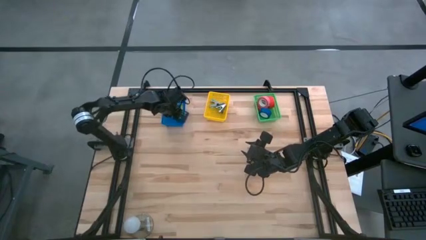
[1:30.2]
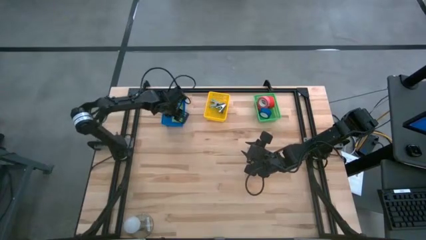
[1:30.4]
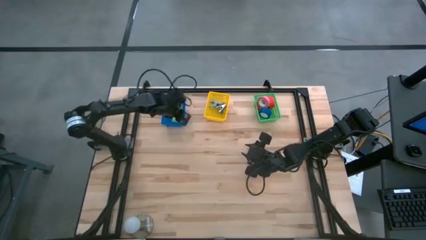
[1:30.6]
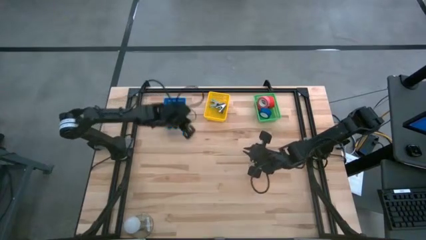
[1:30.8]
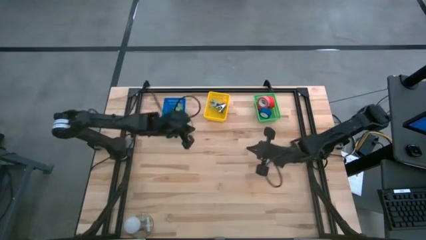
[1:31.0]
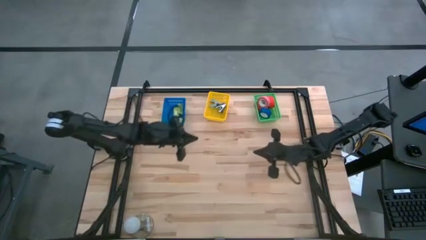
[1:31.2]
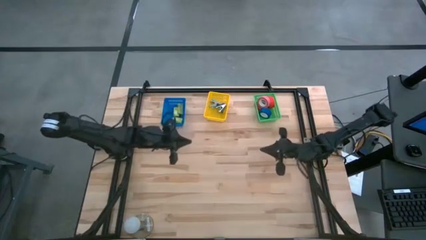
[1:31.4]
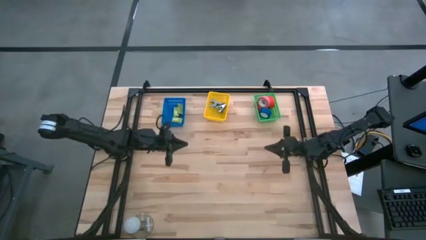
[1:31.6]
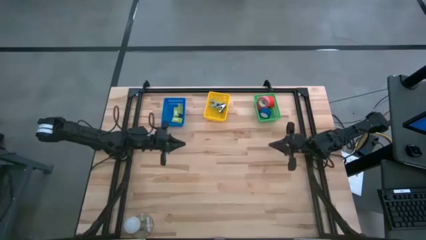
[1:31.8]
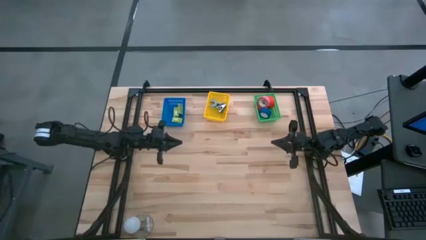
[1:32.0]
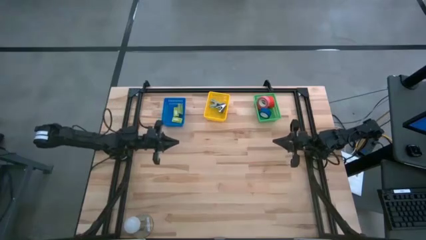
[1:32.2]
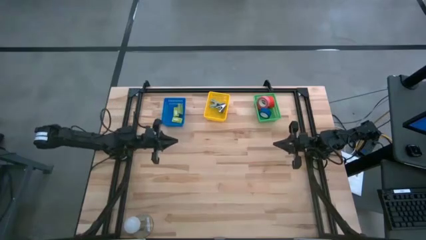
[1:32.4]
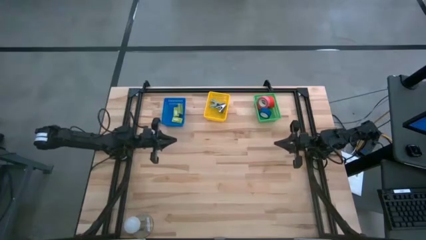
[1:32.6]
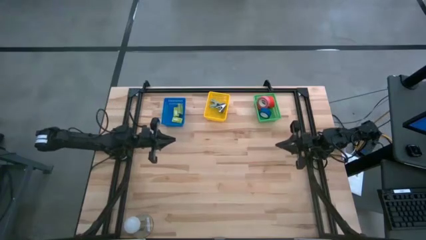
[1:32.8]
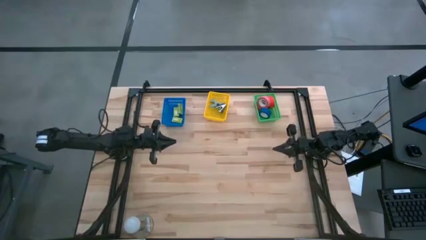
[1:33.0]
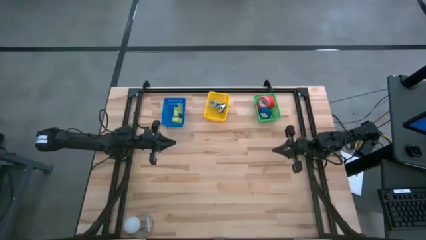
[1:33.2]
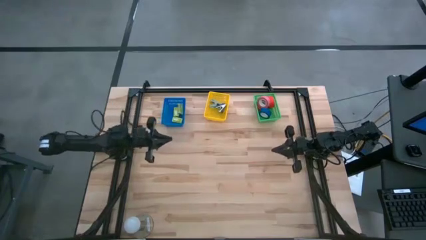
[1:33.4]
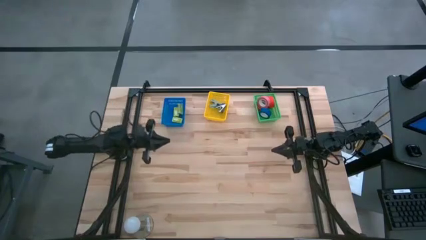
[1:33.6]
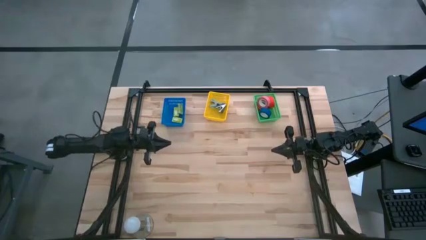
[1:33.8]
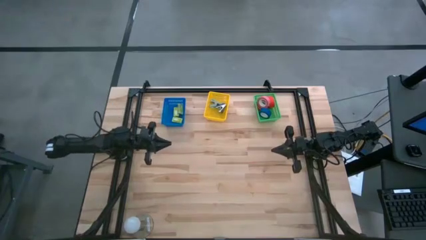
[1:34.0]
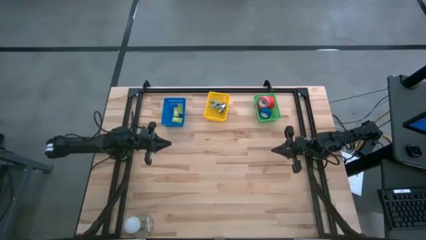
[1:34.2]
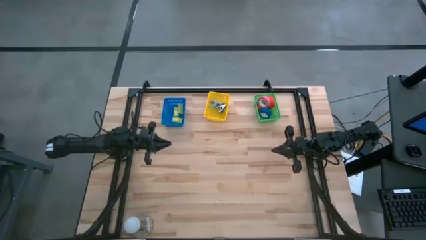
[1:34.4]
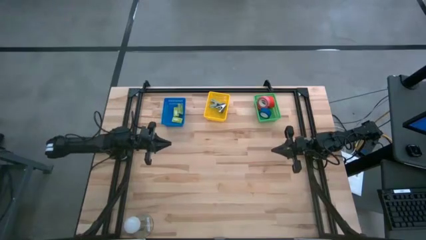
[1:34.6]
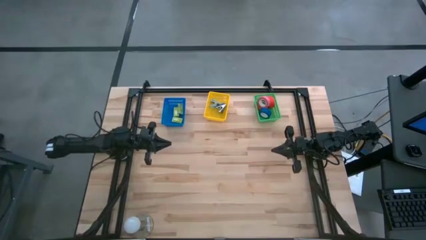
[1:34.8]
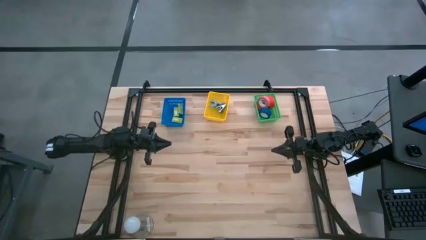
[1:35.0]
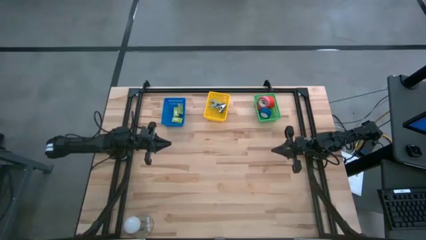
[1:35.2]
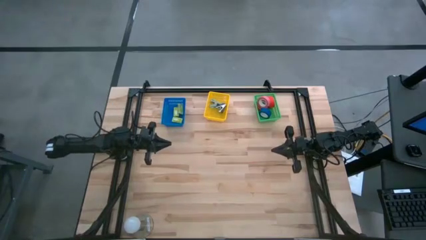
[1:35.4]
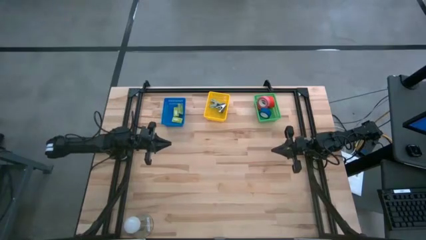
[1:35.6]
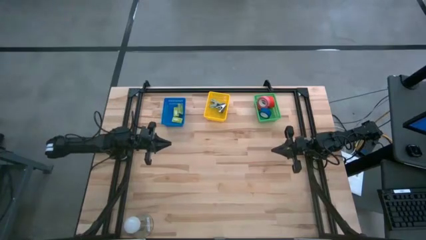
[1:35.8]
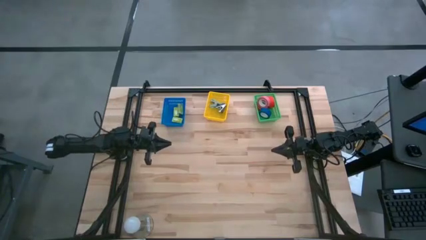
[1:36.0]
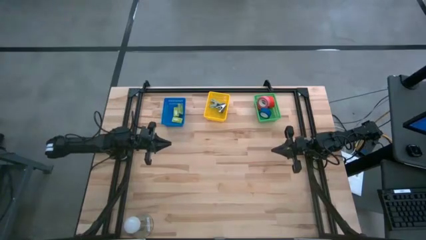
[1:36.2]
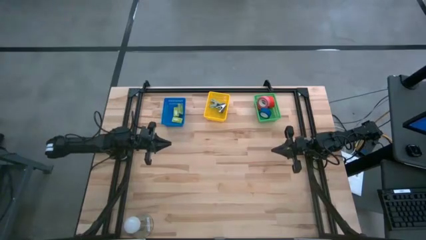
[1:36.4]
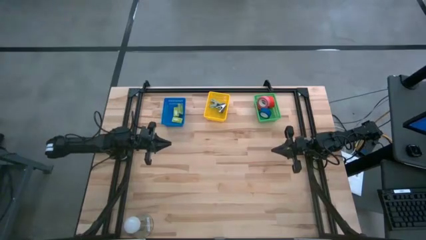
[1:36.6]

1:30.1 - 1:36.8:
Task: Pick and place Stapler, Stapler remover, tape
Return to Home Position

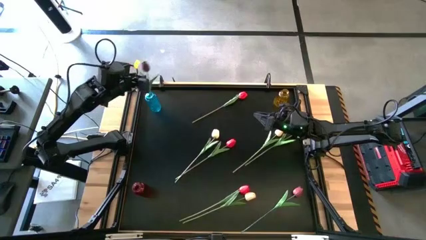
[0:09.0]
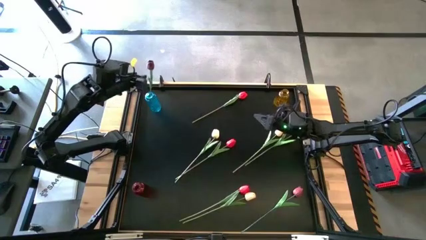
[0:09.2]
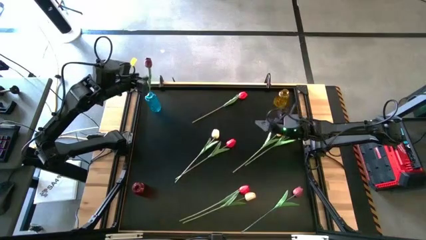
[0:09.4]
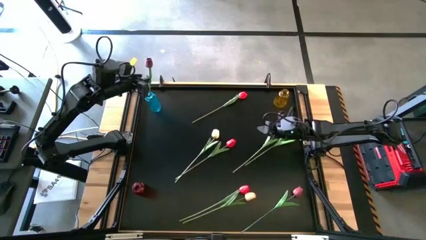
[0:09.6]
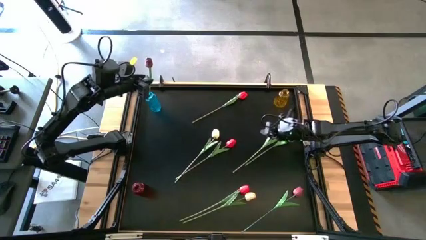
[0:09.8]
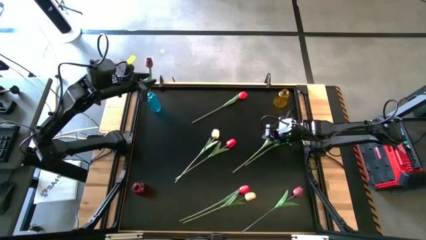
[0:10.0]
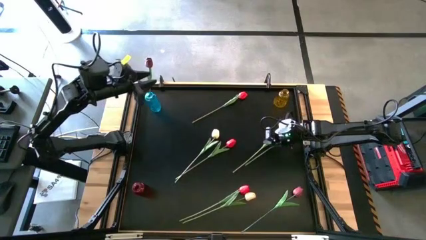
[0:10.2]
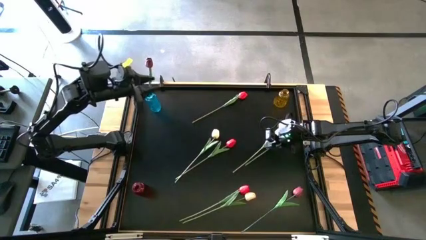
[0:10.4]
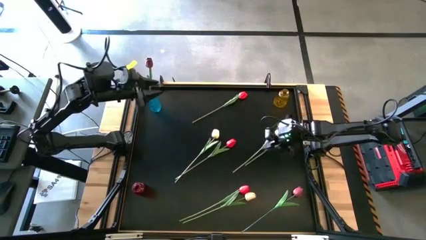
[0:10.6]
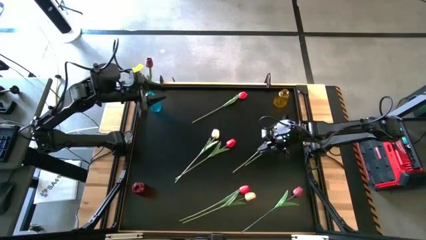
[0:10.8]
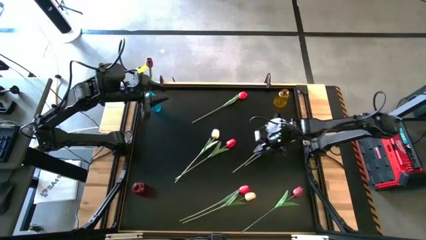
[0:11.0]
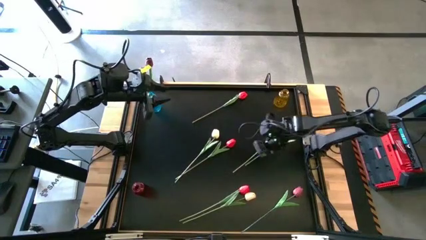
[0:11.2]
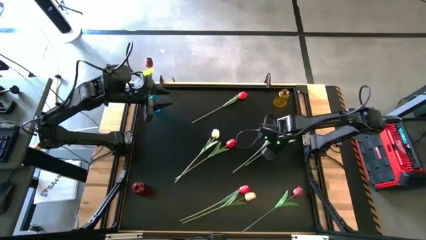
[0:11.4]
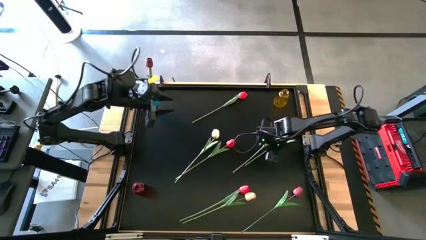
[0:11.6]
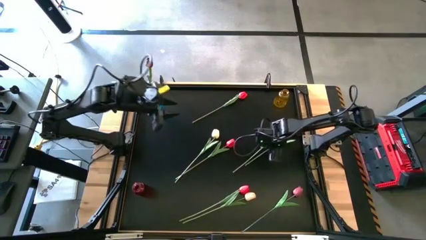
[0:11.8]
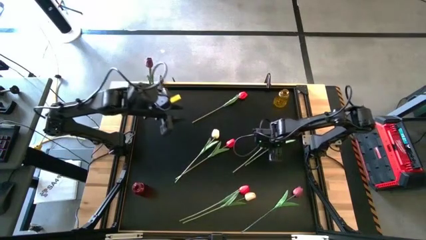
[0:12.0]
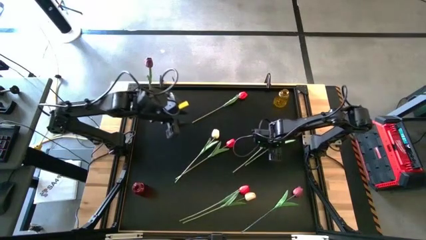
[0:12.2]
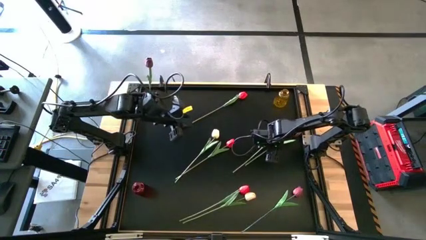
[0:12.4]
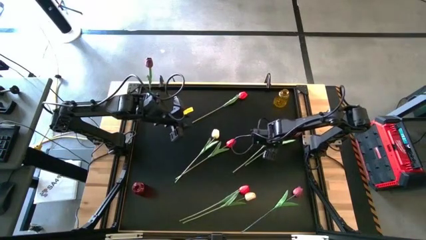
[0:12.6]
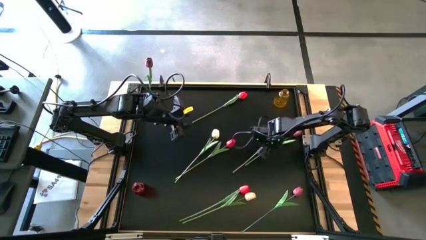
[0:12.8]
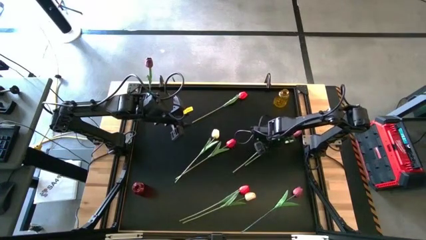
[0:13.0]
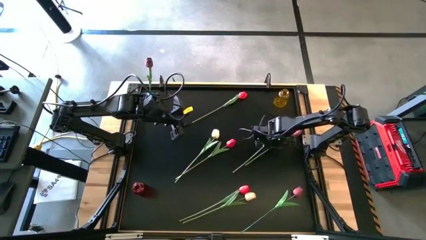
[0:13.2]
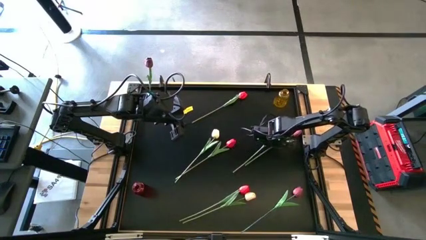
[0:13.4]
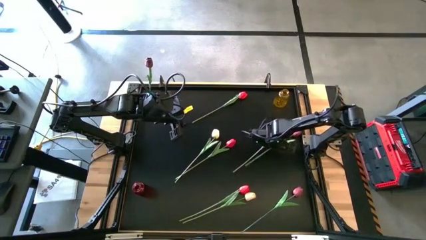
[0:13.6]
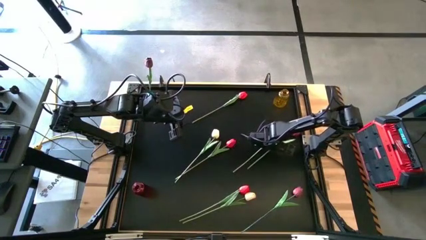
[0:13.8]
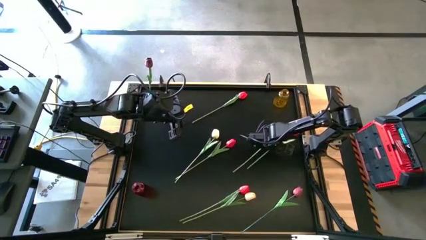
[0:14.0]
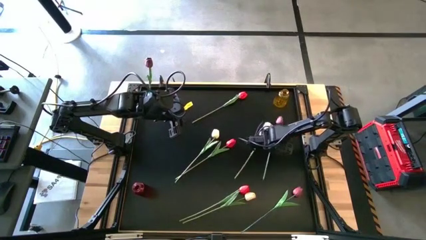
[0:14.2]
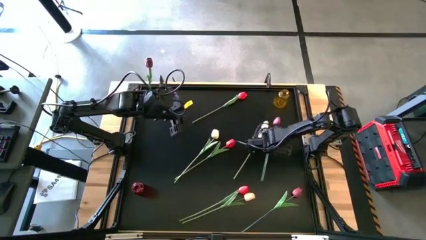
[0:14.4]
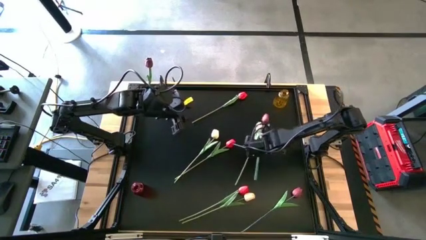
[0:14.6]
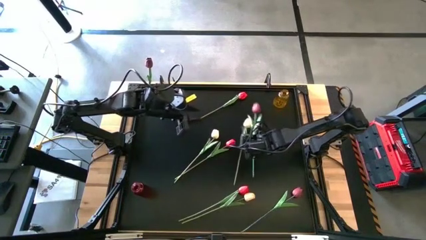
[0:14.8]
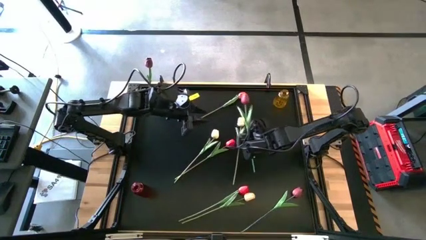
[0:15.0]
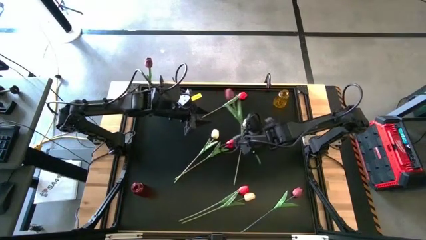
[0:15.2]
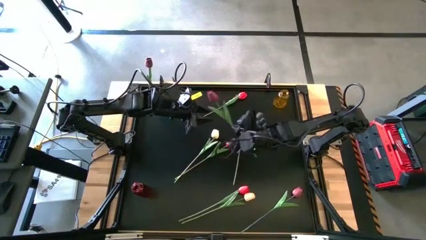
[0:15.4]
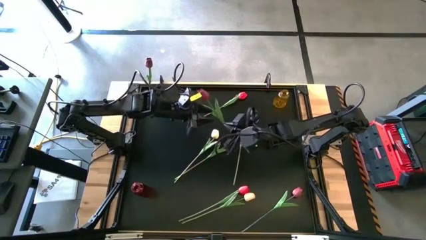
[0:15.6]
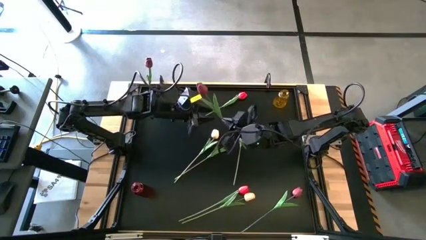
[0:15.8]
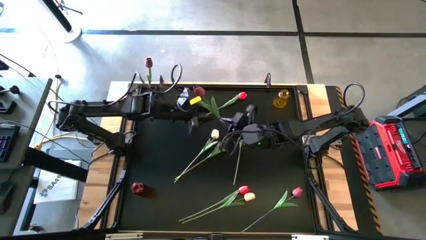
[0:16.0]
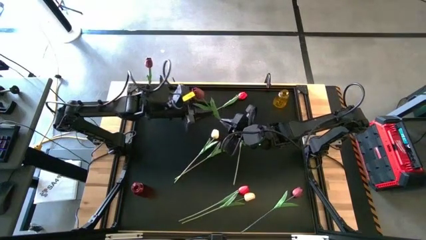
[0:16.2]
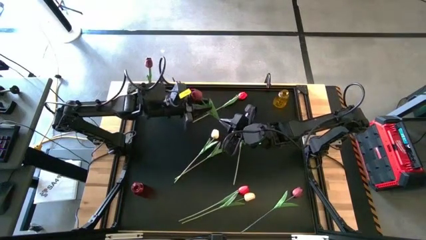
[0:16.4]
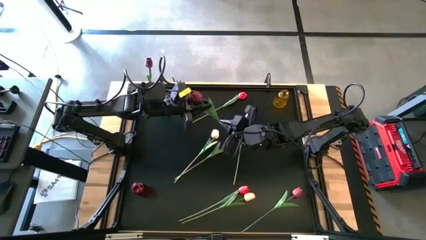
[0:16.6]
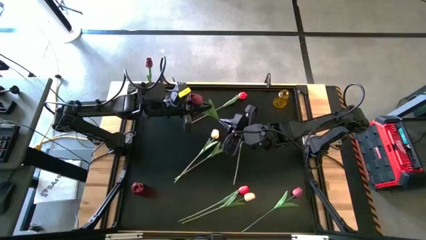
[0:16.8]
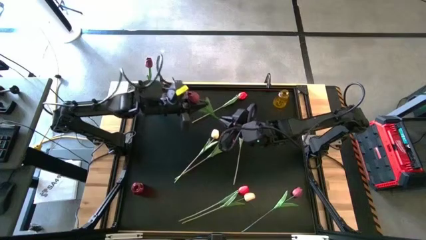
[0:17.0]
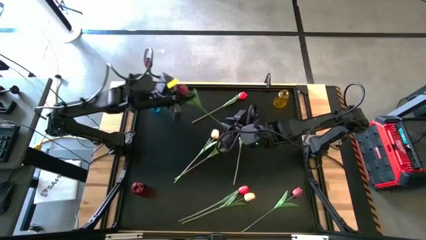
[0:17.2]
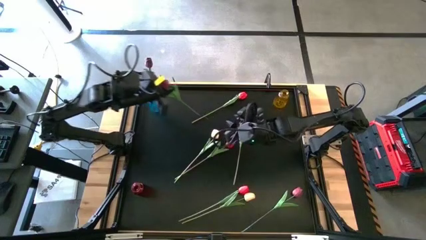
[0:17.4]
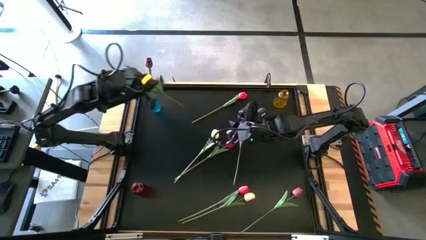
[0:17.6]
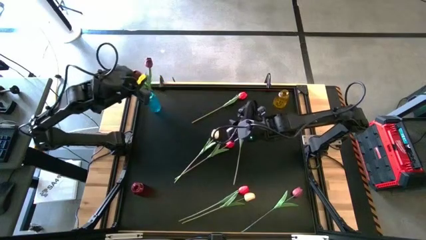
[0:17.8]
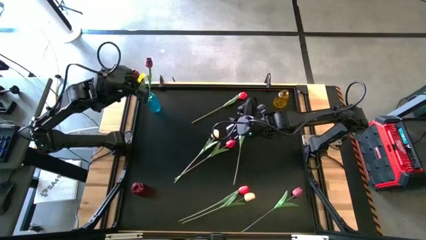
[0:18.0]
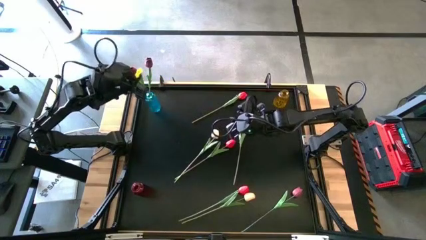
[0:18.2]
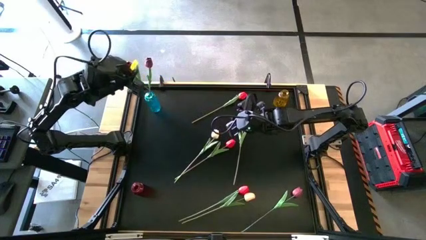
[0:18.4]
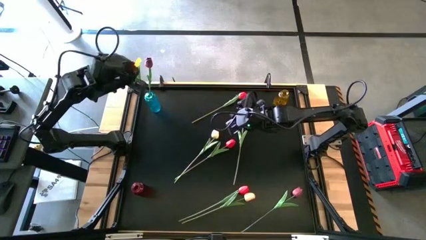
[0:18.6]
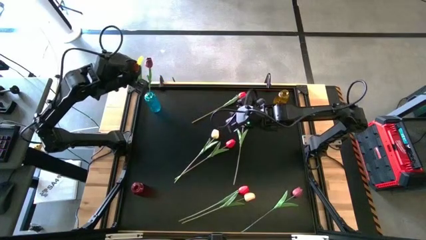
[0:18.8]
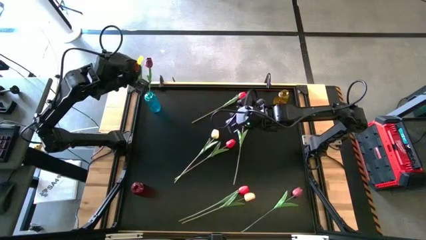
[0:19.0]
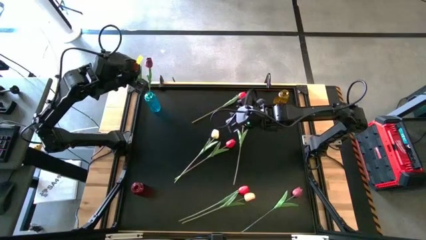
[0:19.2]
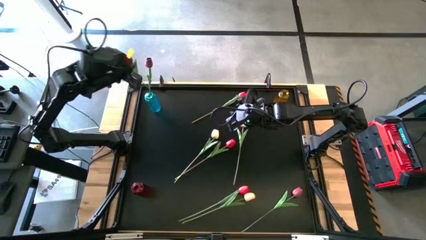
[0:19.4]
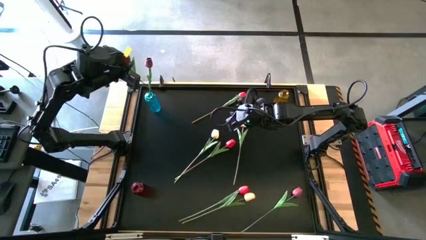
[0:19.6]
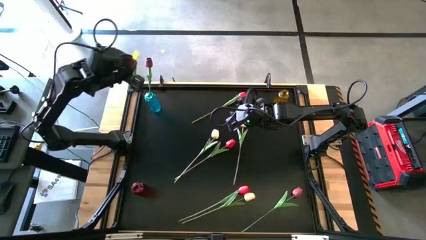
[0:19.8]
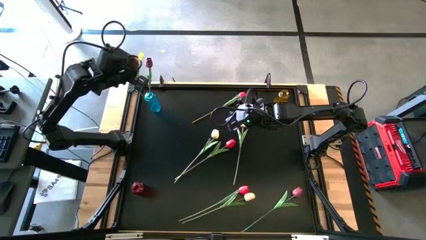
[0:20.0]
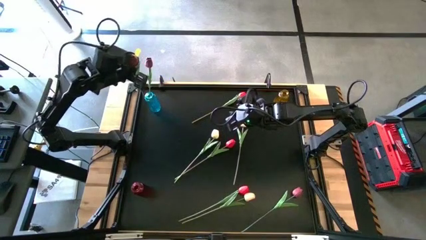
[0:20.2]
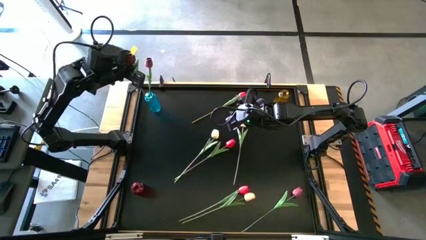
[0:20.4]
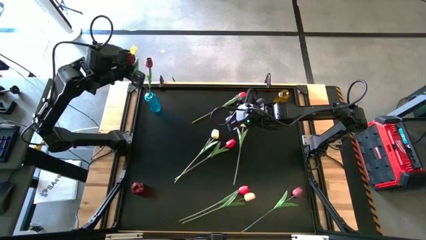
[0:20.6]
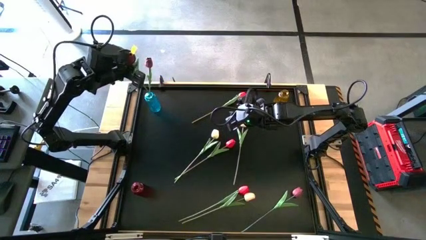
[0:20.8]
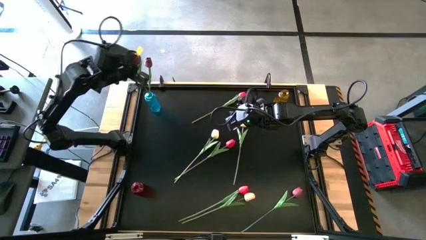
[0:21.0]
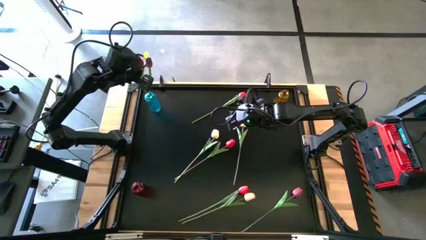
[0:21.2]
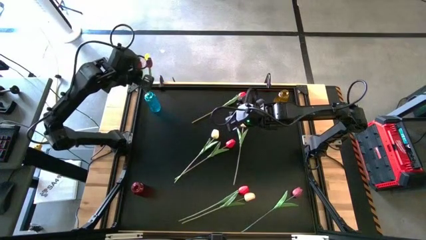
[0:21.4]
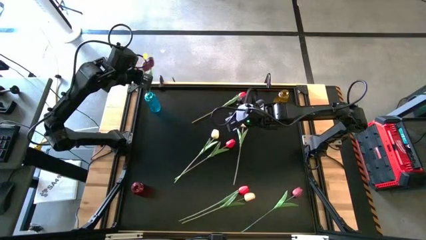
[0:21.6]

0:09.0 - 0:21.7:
Task: Sort flowers into vase by color
Put the middle right dark red flower into the blue vase
